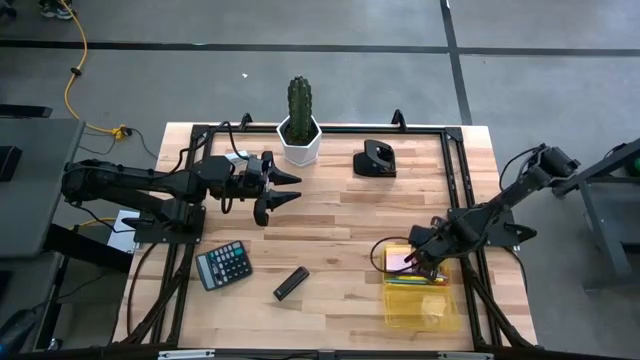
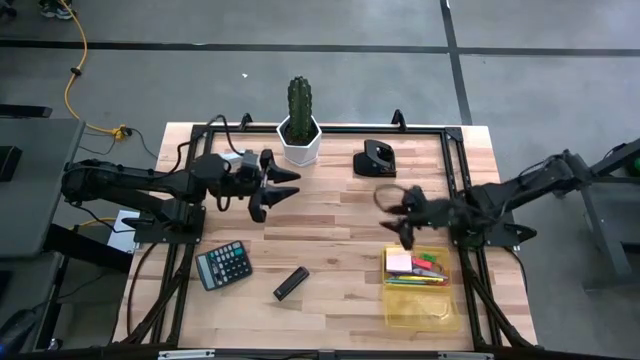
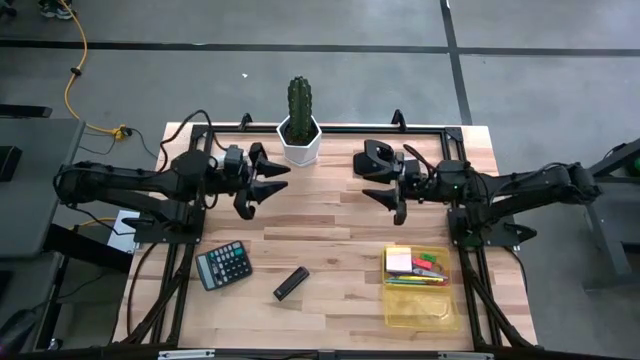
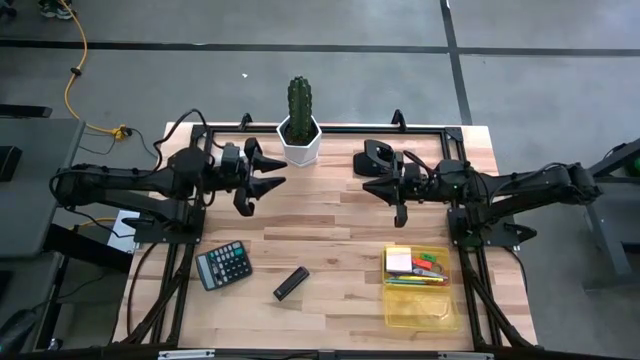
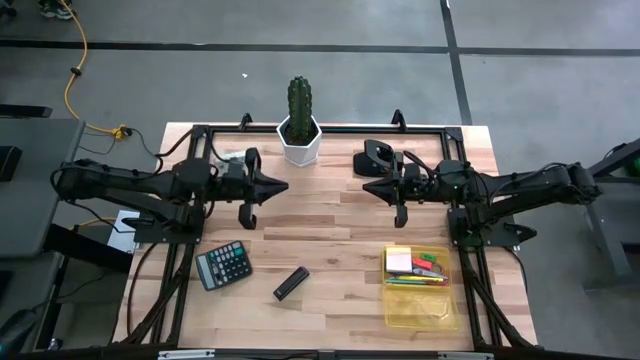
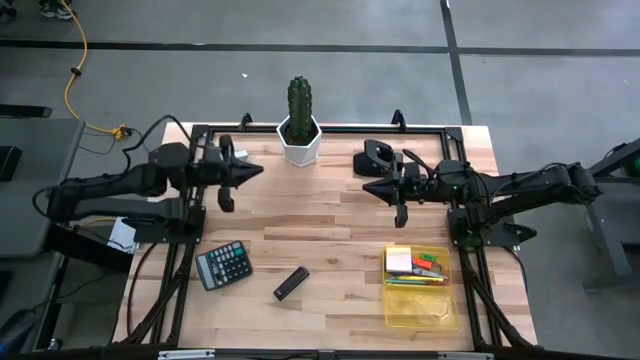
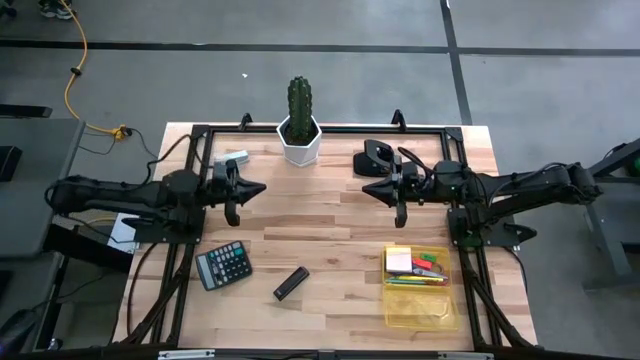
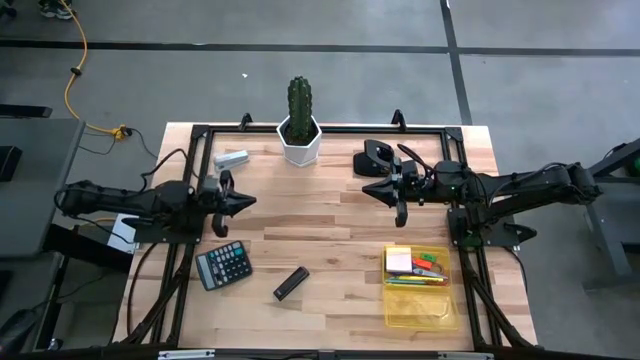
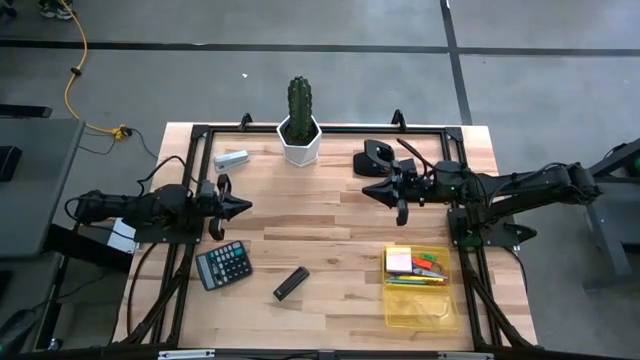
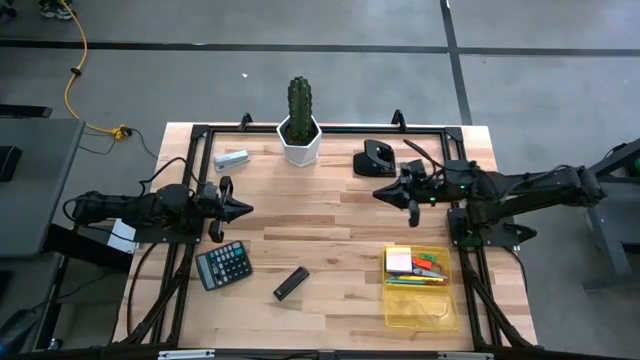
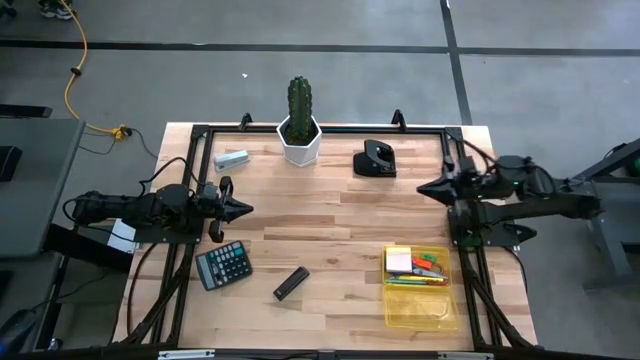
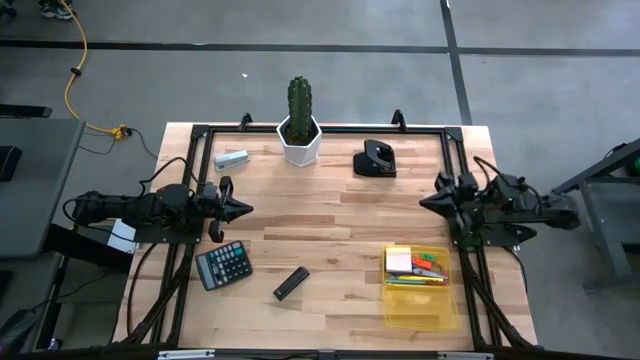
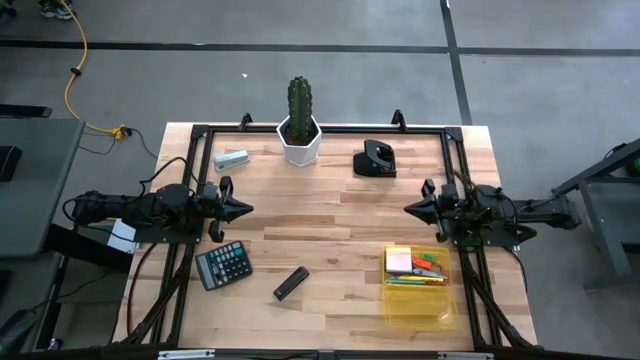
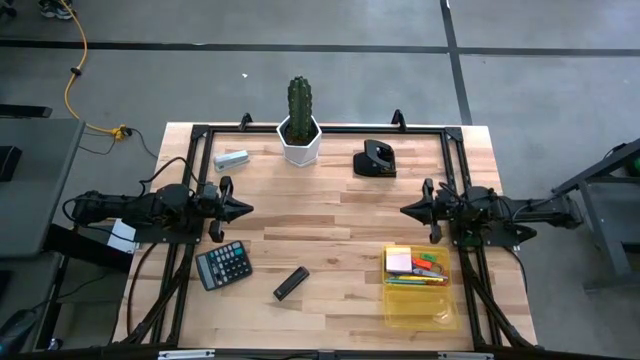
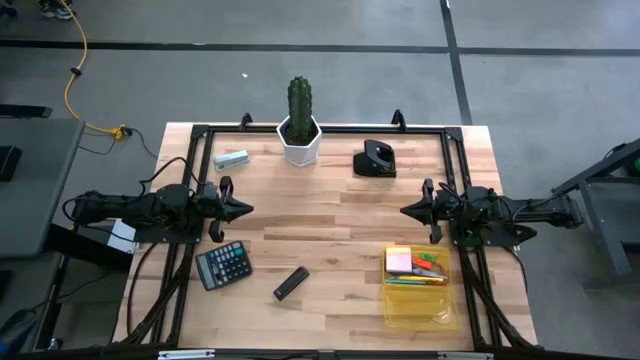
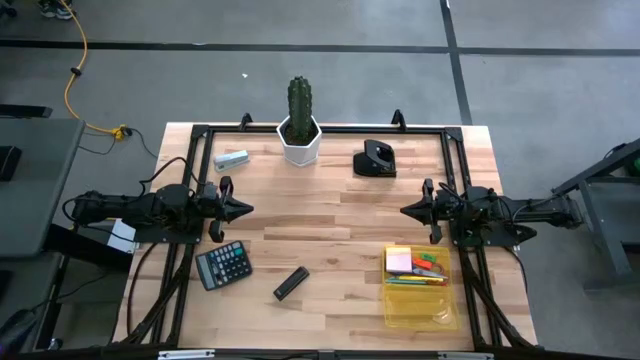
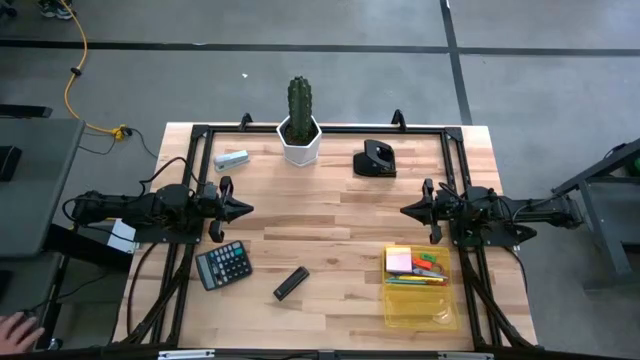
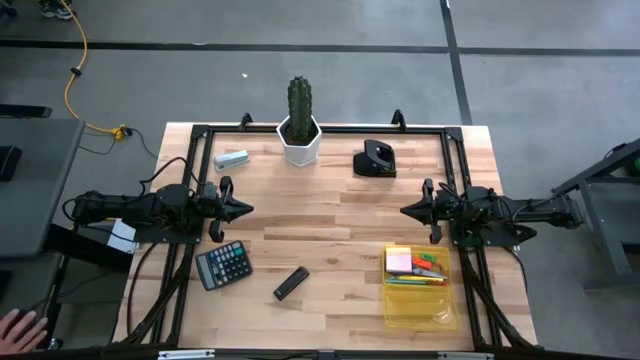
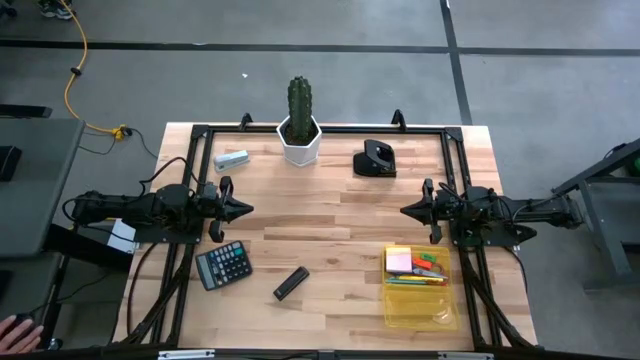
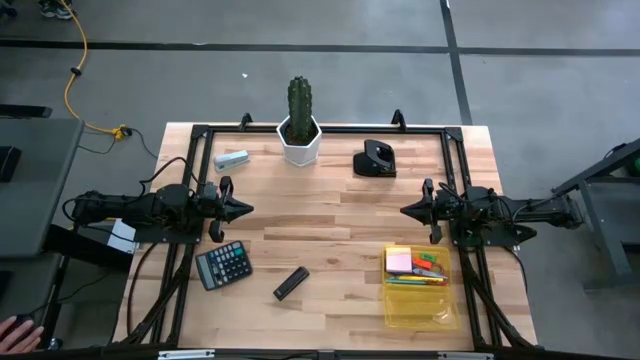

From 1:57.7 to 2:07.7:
Task: Pack school essentials
Return to Home Position

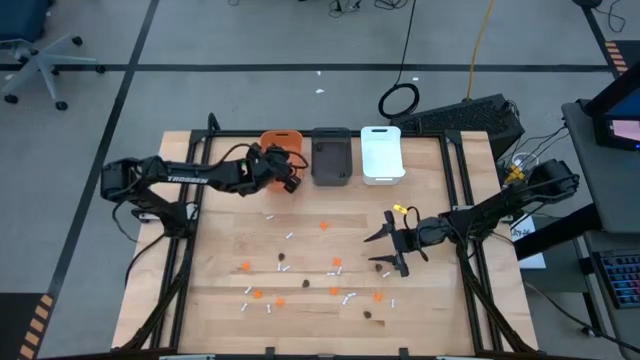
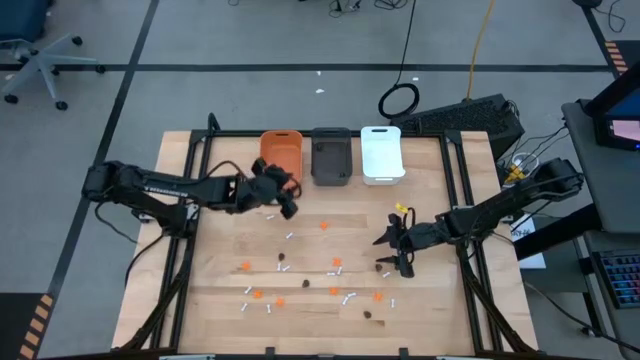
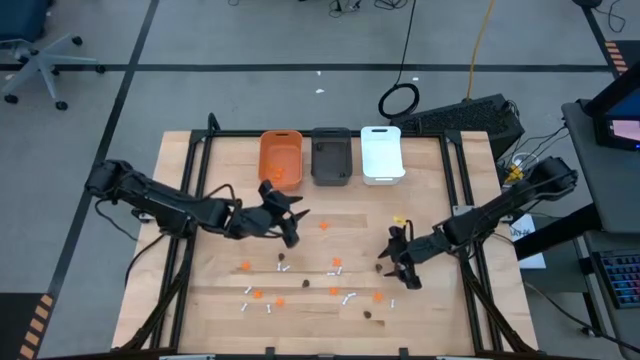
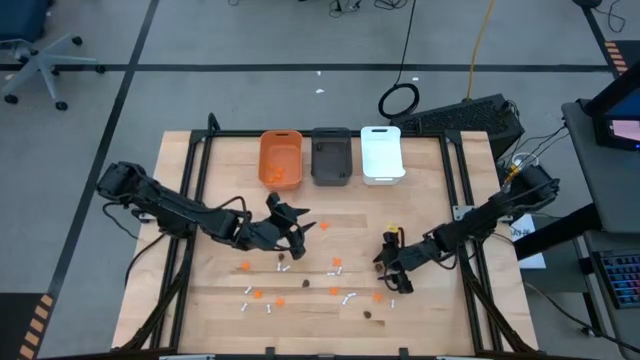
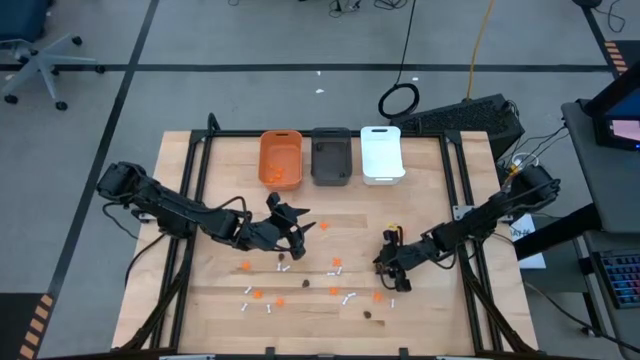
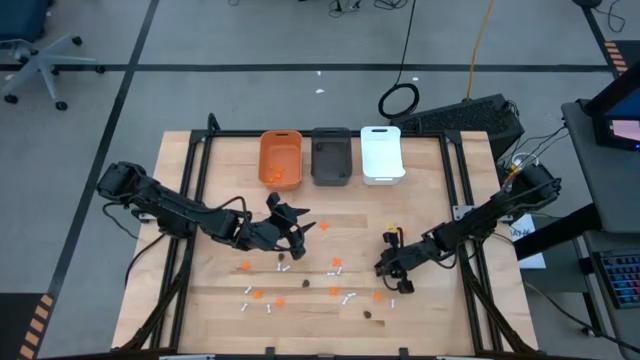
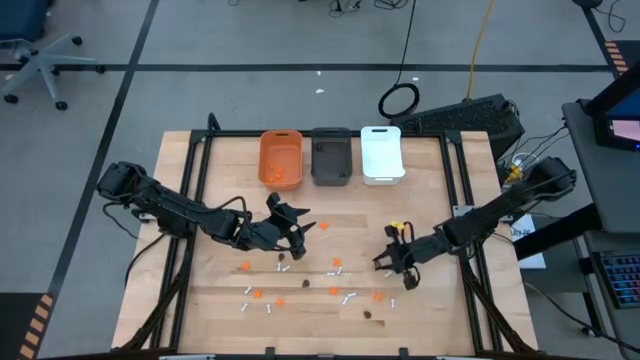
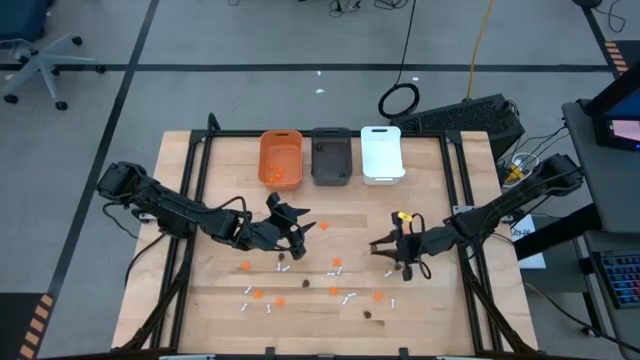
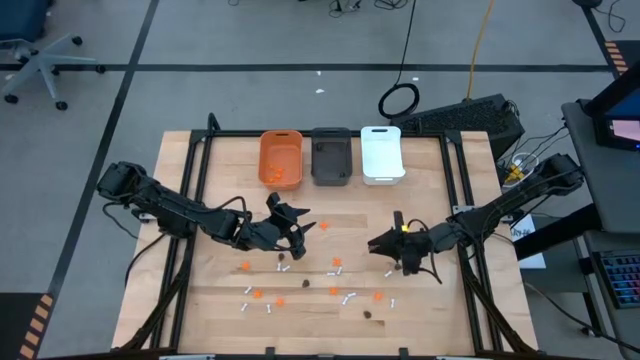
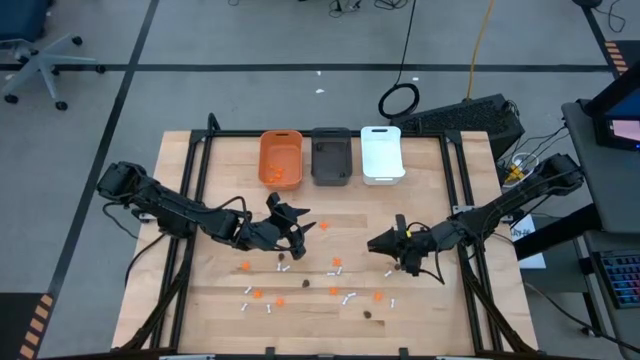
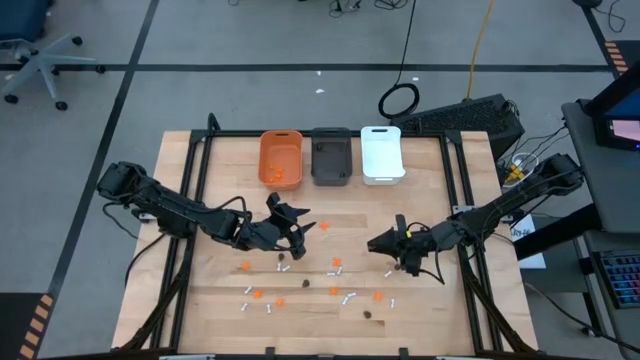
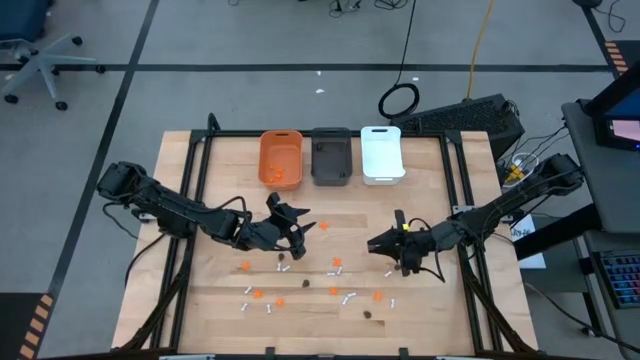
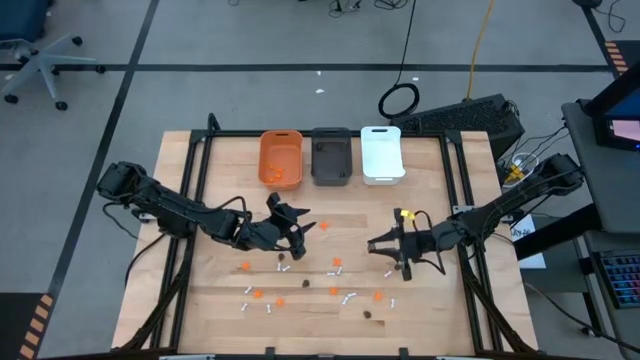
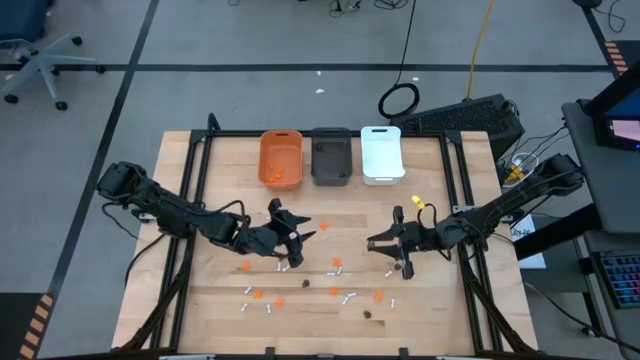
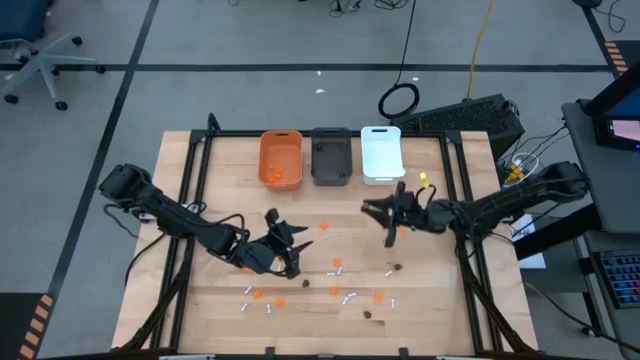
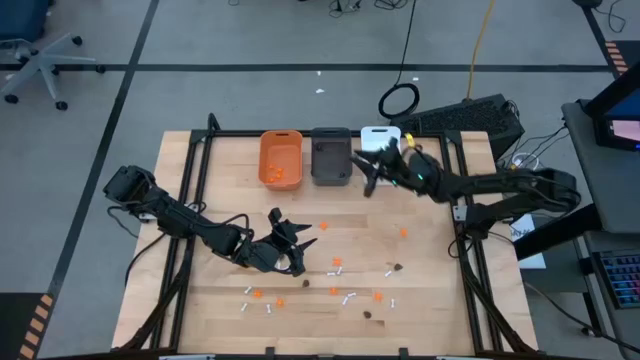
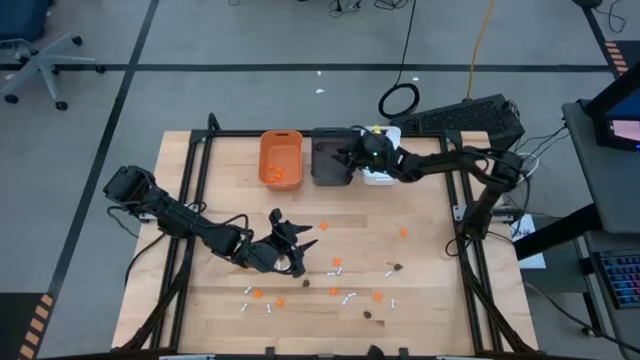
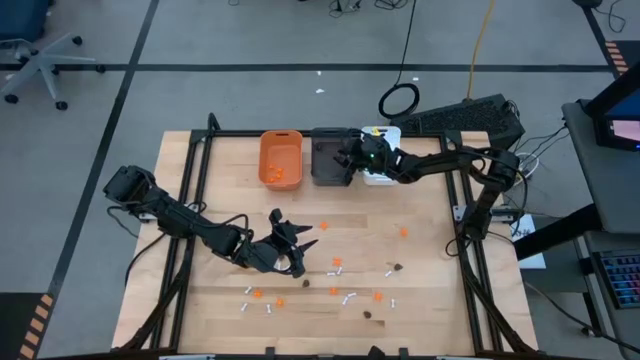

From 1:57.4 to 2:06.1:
Task: Sort Halloween decoration
Put the black skull toy into the black bin
